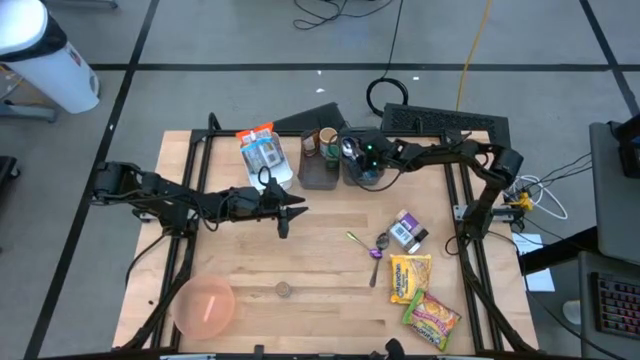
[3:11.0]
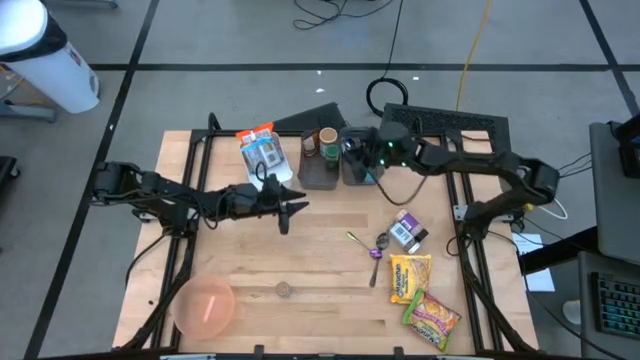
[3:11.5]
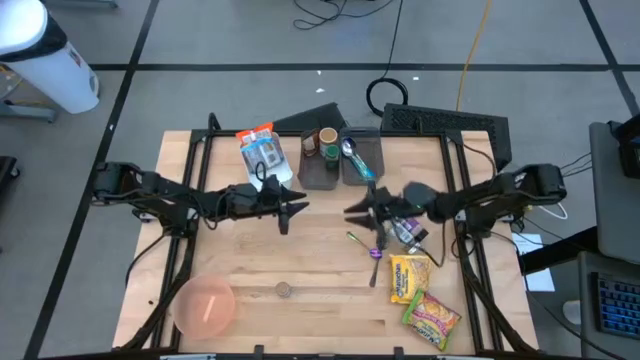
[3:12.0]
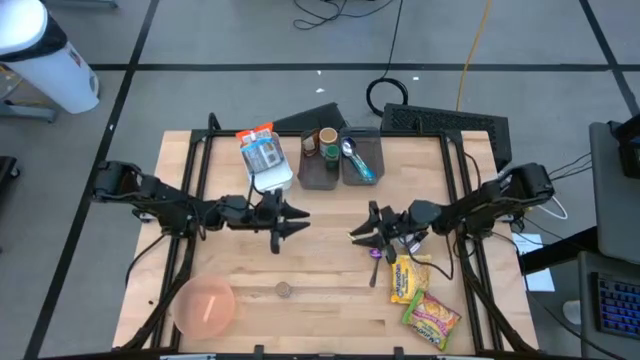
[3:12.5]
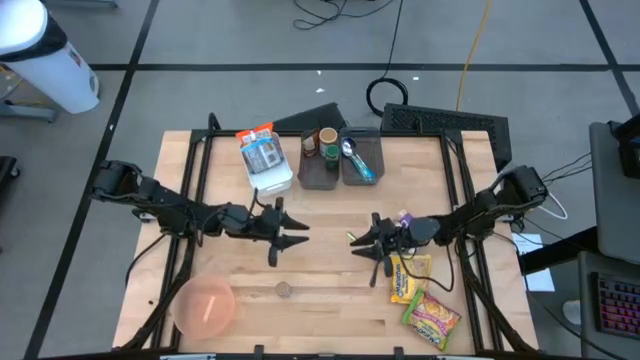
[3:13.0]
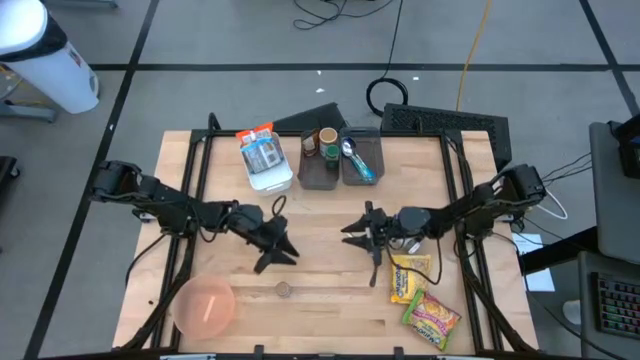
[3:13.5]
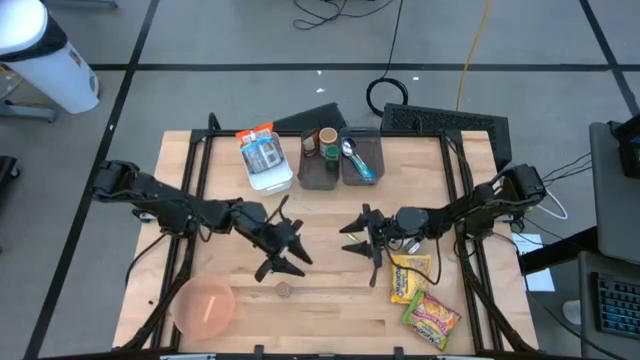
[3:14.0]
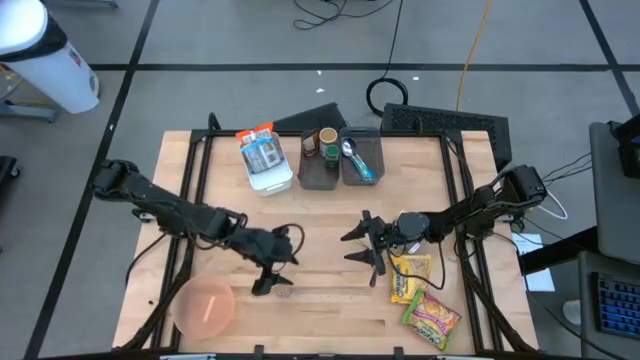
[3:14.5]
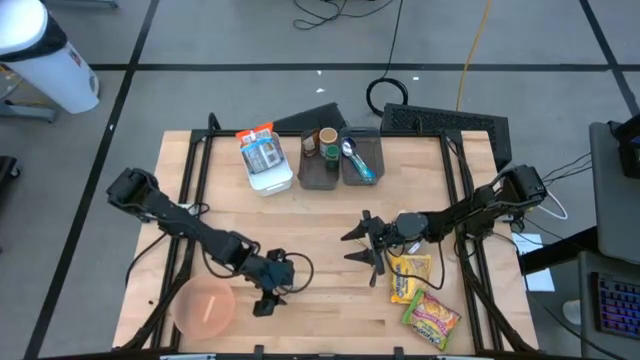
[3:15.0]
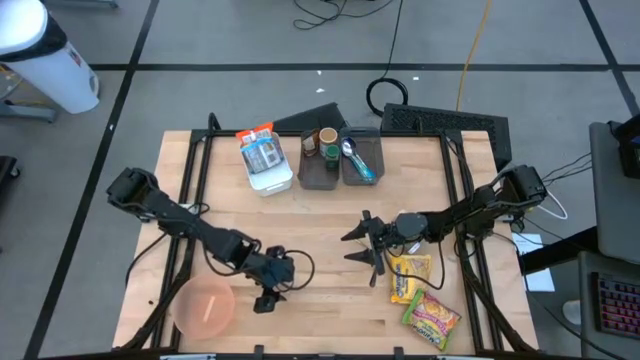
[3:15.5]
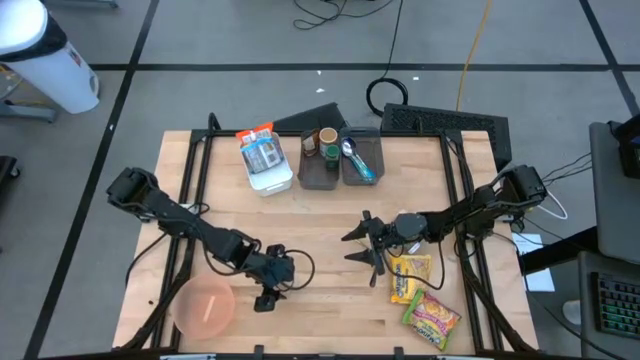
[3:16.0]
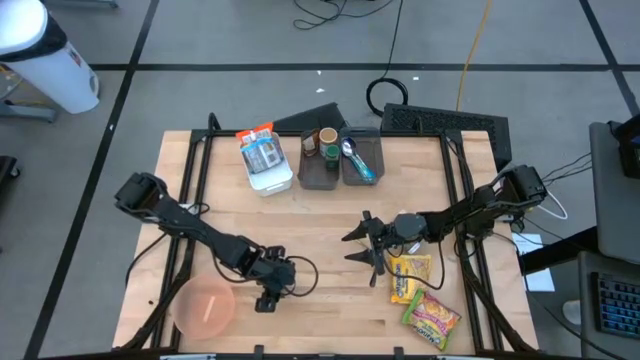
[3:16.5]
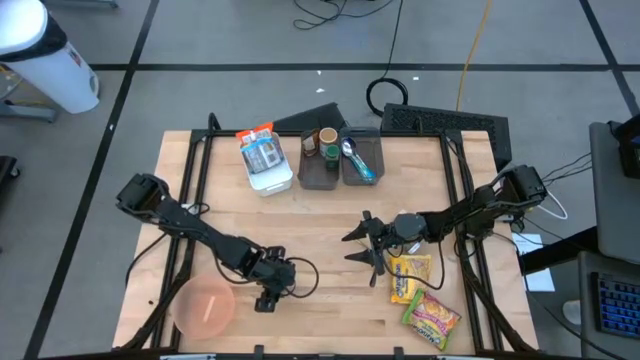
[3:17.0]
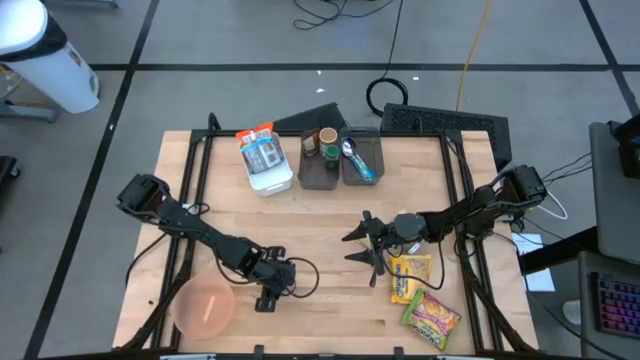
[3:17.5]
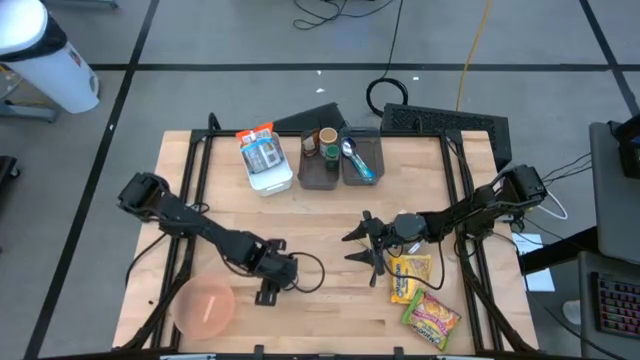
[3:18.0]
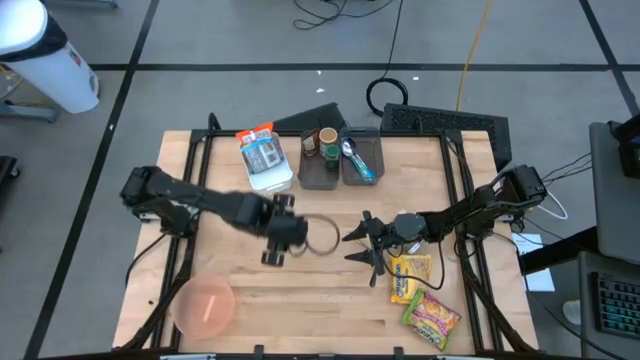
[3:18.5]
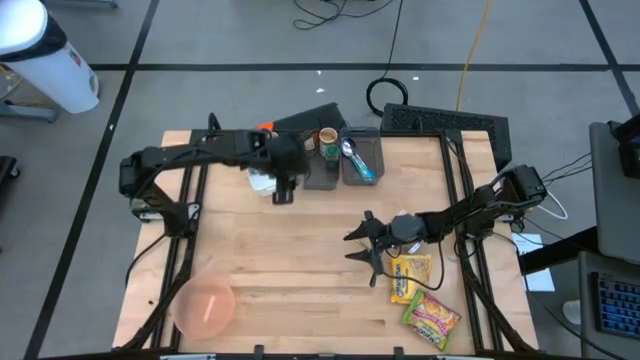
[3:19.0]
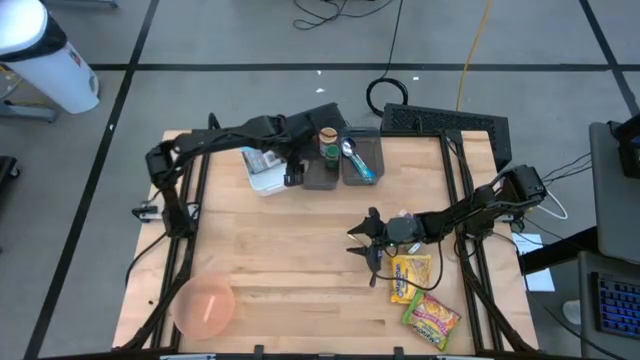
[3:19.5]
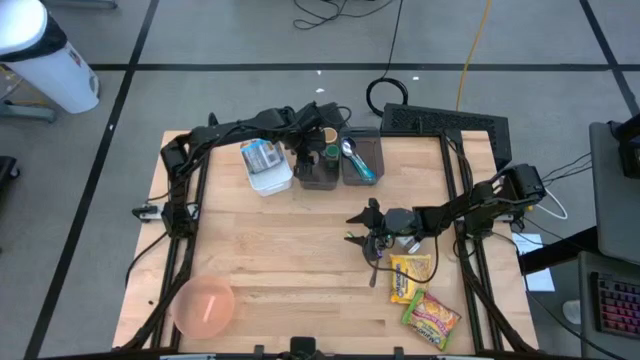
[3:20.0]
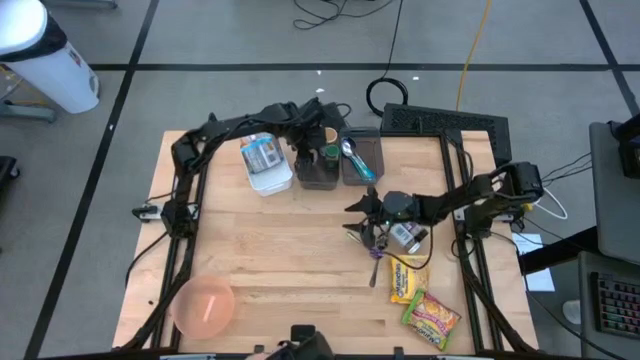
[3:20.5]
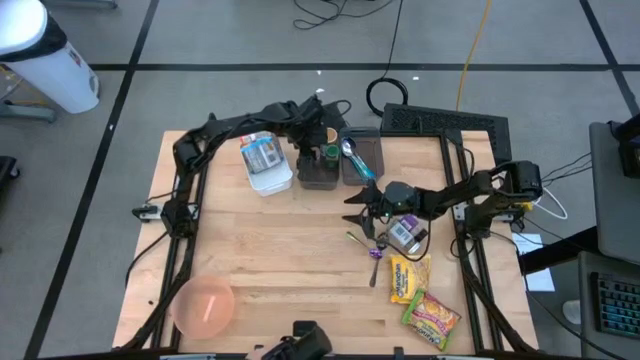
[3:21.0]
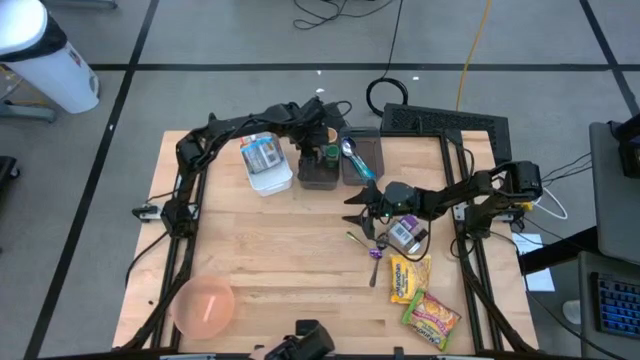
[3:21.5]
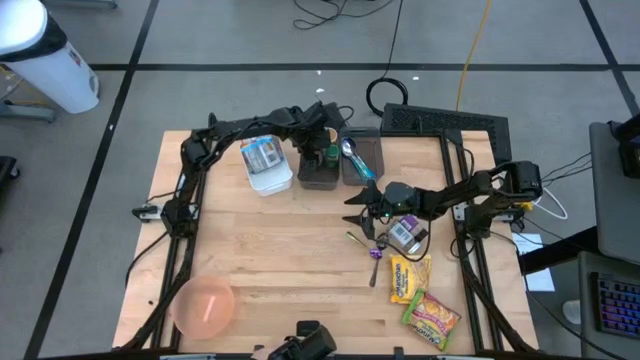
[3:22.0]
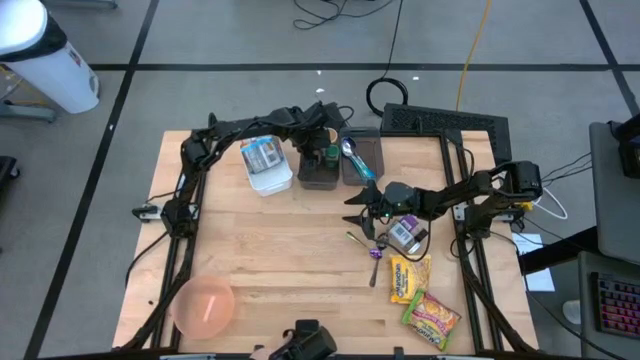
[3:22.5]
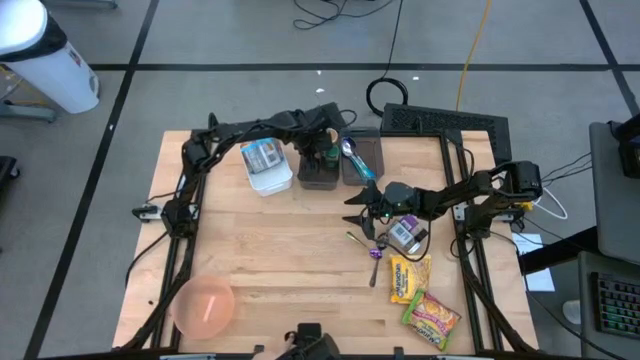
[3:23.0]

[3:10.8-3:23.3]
Task: Pick & Place Food Item
Put the brown seasoning bottle into the left black bin

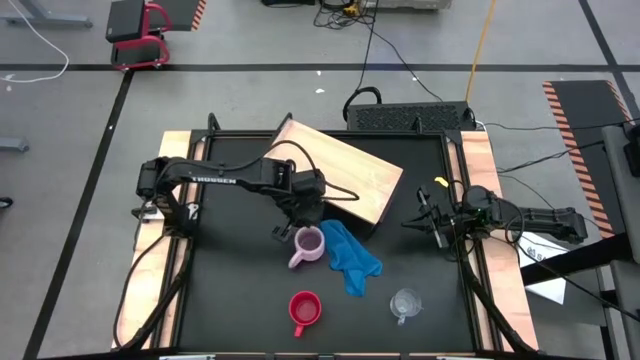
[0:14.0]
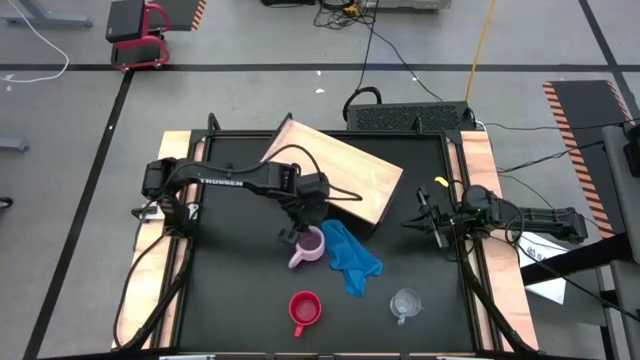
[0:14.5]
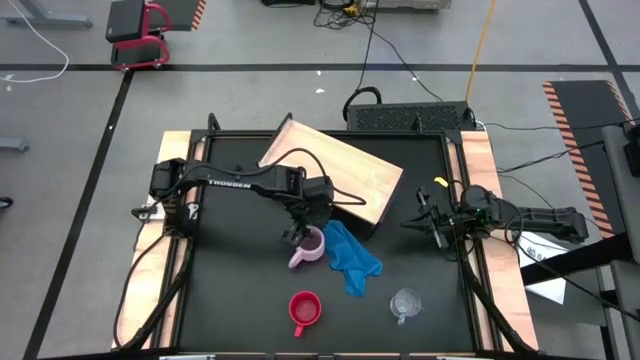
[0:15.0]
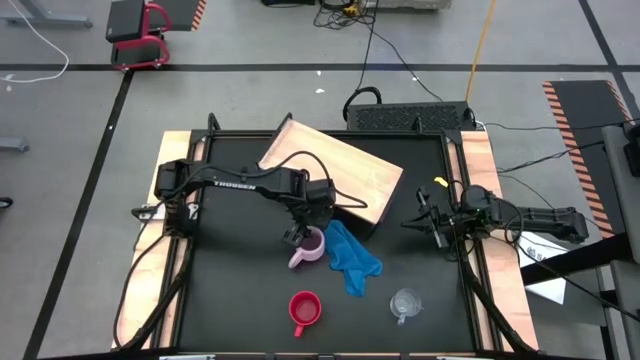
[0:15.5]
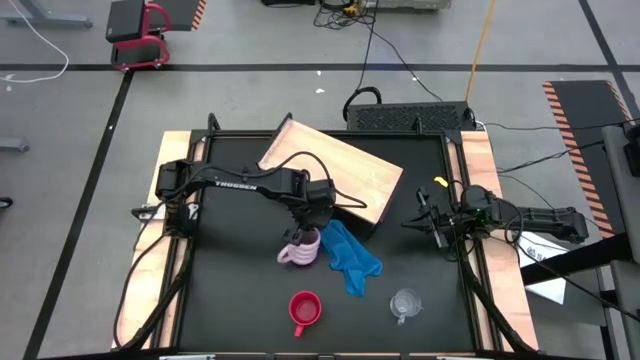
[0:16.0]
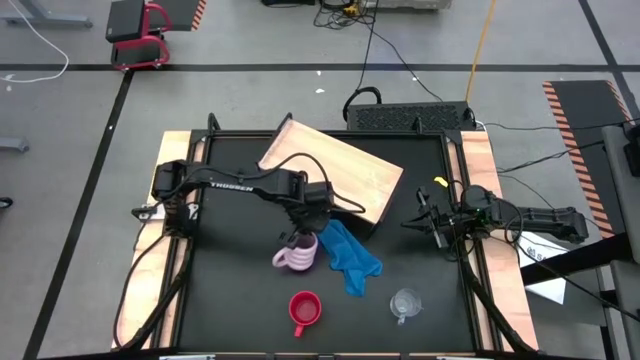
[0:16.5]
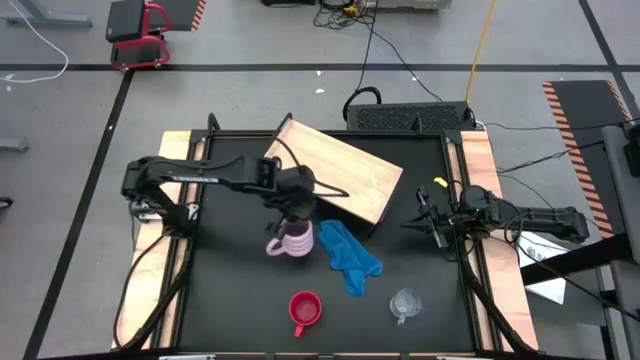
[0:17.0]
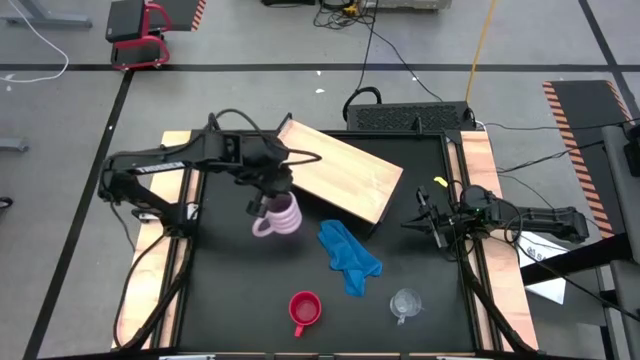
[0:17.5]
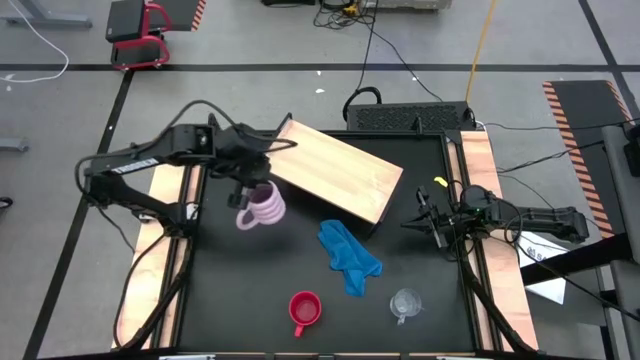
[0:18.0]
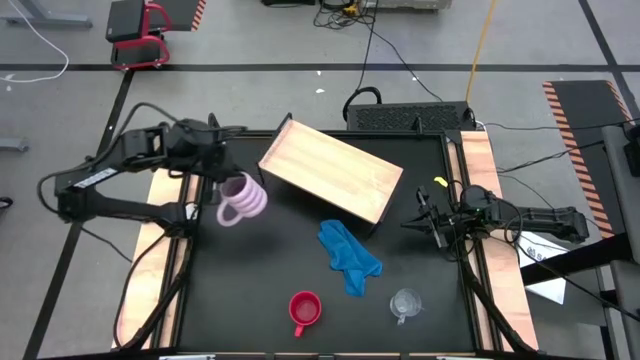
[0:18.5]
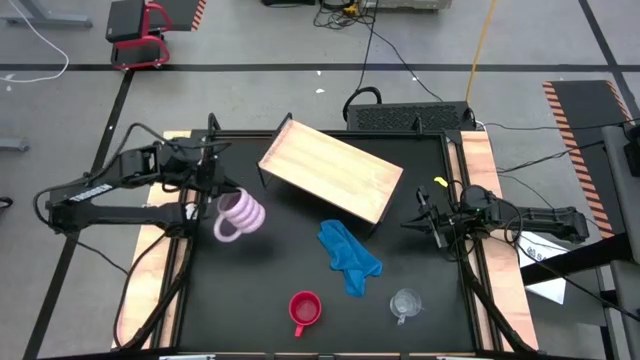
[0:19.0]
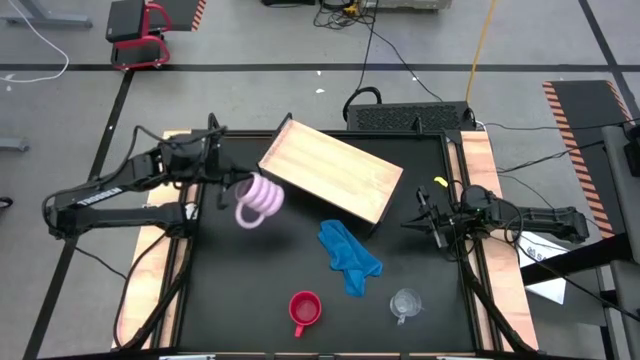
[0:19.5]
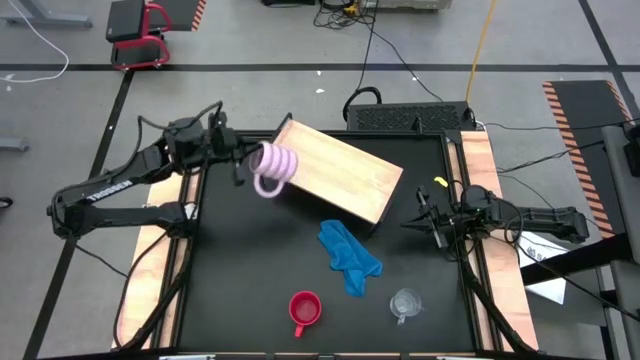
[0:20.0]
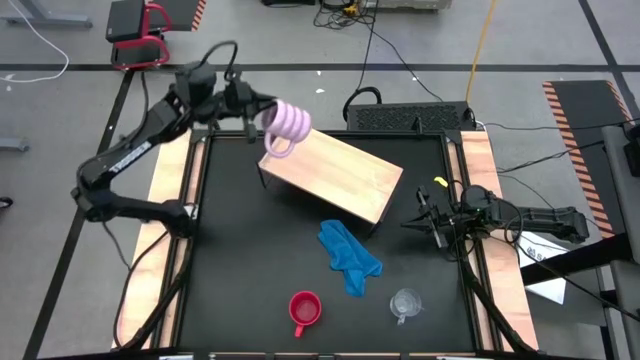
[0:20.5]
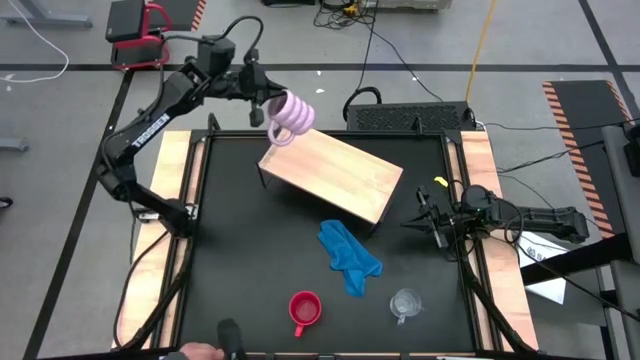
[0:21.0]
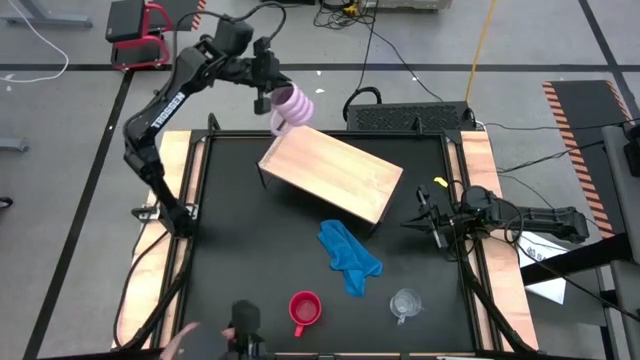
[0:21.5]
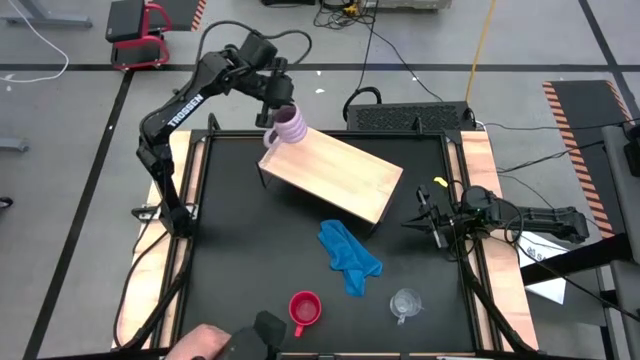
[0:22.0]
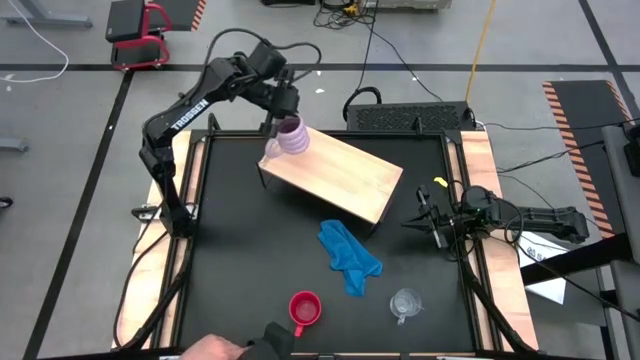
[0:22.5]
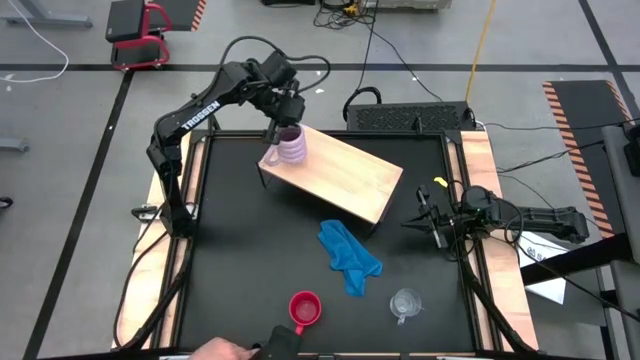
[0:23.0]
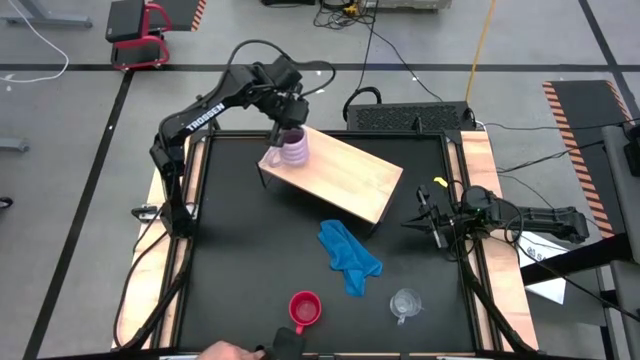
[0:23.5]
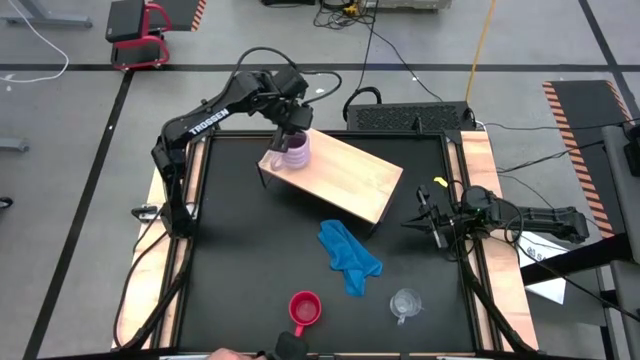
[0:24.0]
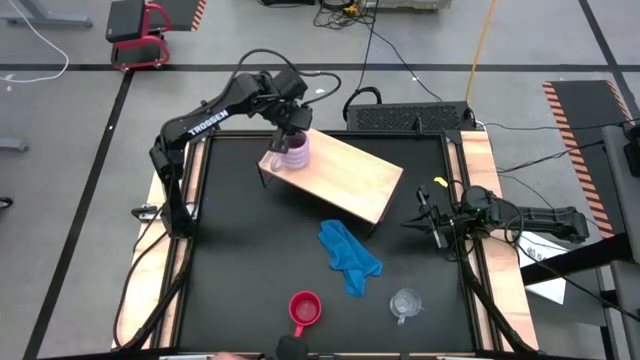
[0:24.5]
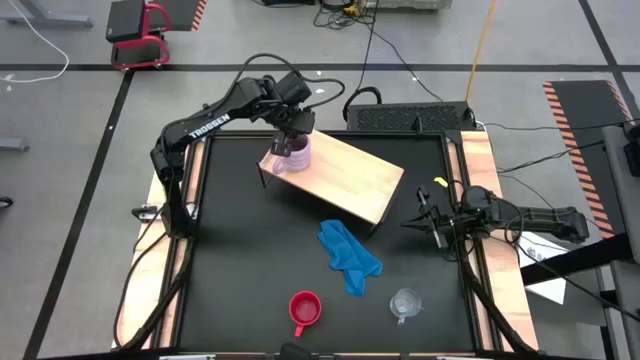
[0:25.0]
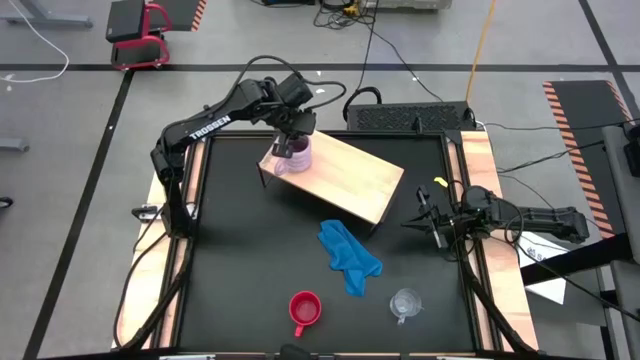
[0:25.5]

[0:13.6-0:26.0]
Task: Stack small to large cups/mugs on shelf
Put the pink mug on the shelf
